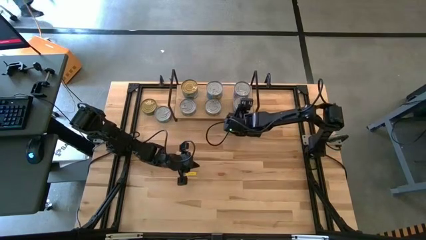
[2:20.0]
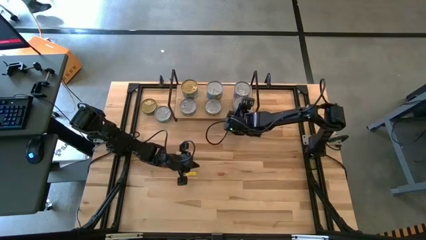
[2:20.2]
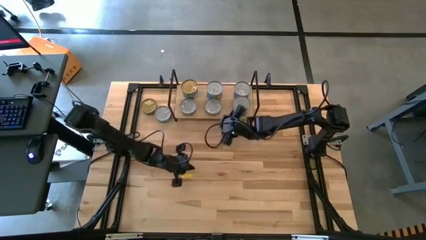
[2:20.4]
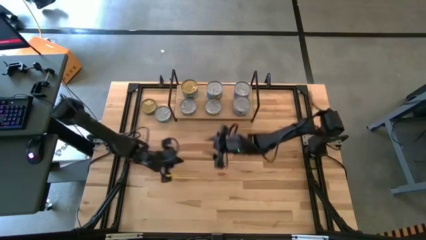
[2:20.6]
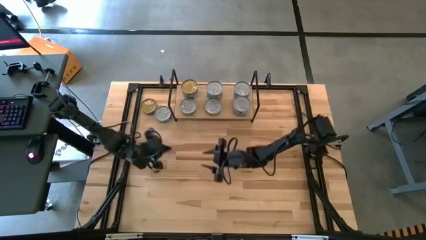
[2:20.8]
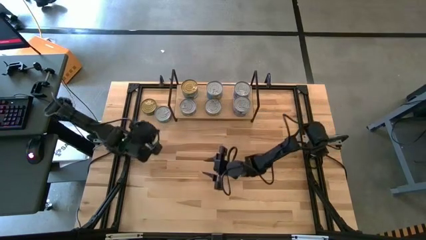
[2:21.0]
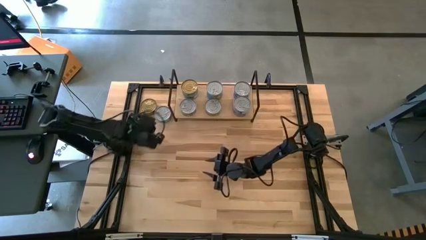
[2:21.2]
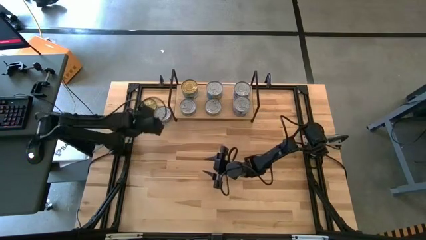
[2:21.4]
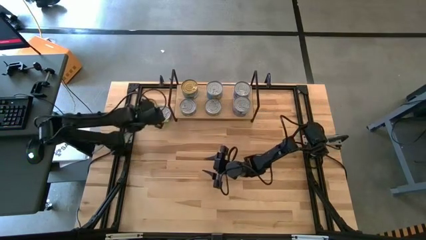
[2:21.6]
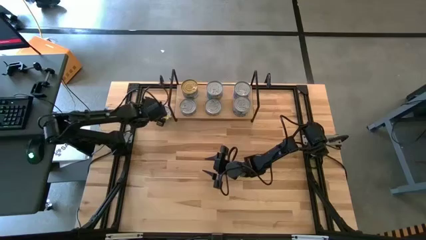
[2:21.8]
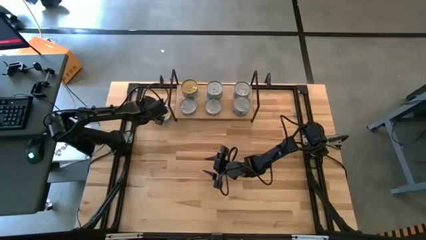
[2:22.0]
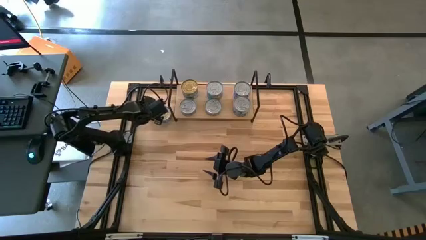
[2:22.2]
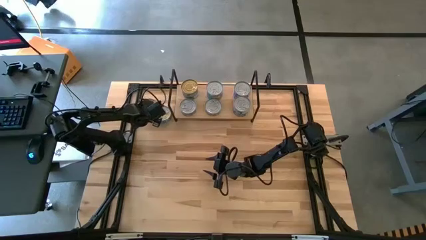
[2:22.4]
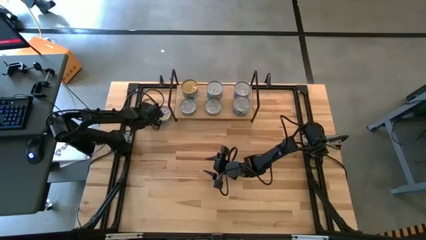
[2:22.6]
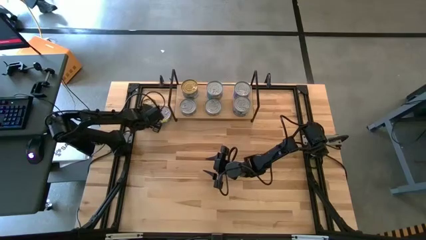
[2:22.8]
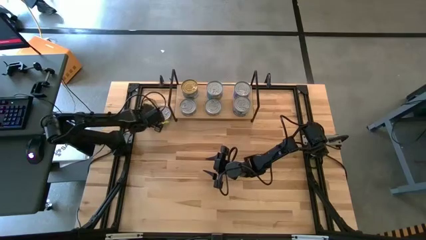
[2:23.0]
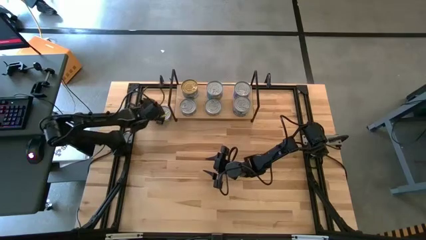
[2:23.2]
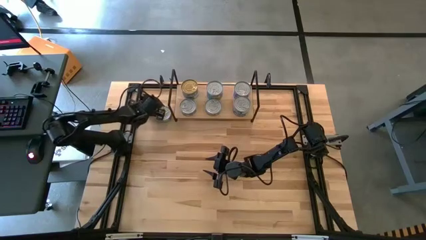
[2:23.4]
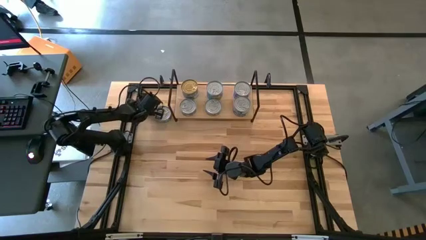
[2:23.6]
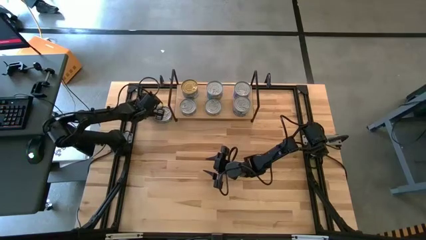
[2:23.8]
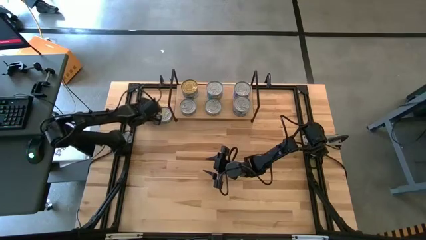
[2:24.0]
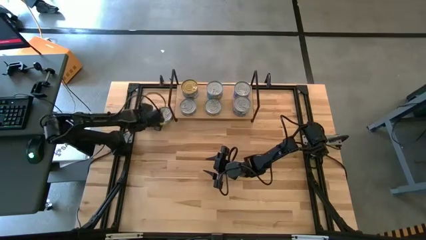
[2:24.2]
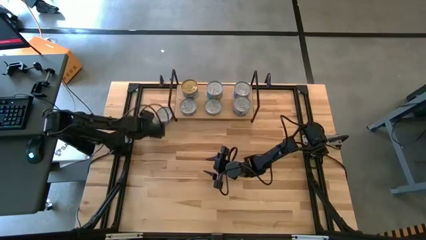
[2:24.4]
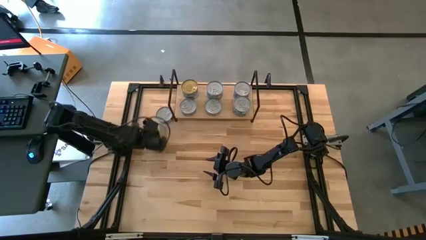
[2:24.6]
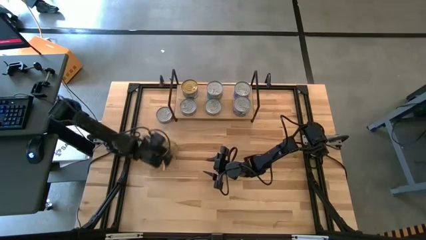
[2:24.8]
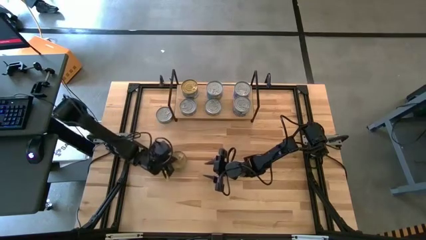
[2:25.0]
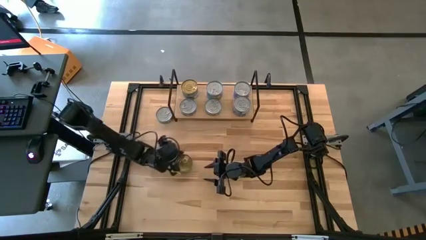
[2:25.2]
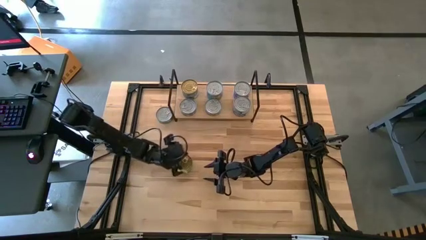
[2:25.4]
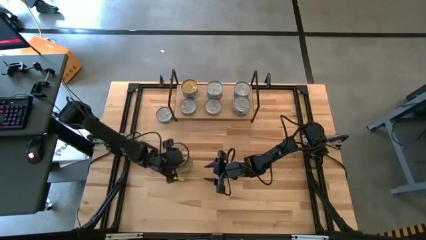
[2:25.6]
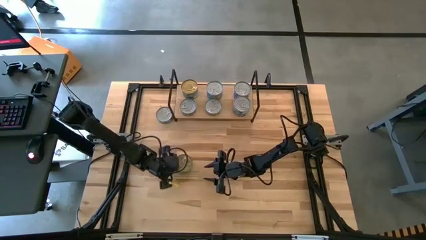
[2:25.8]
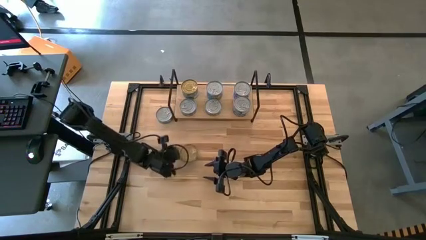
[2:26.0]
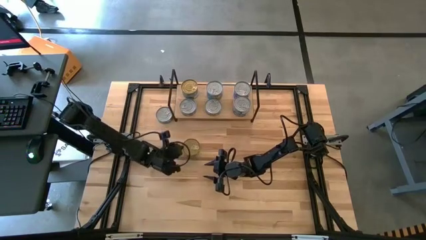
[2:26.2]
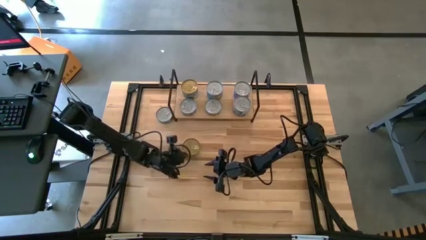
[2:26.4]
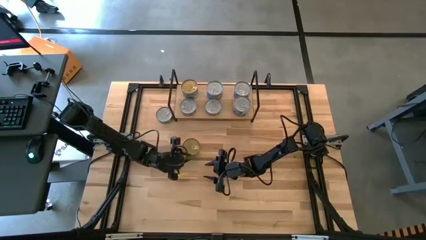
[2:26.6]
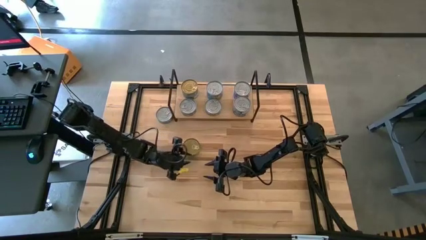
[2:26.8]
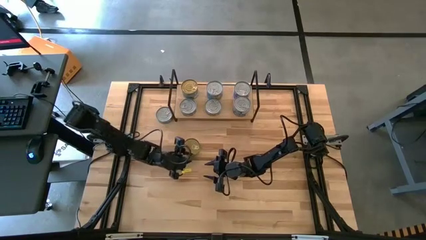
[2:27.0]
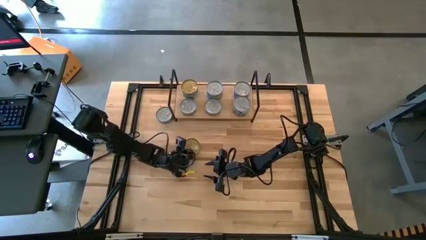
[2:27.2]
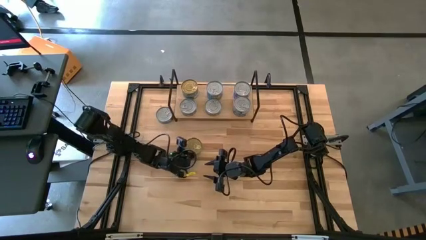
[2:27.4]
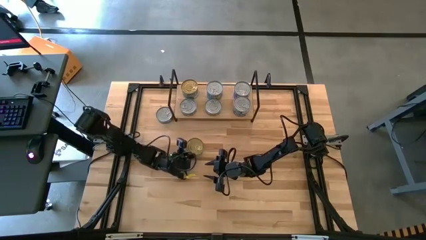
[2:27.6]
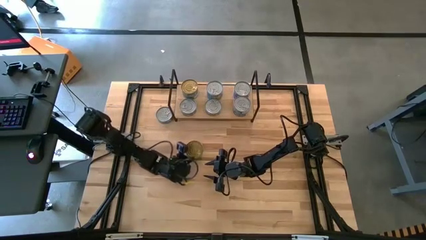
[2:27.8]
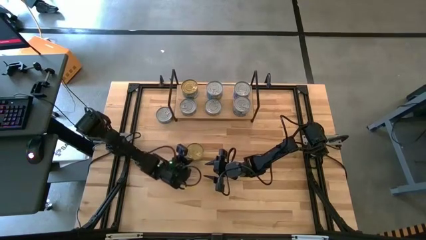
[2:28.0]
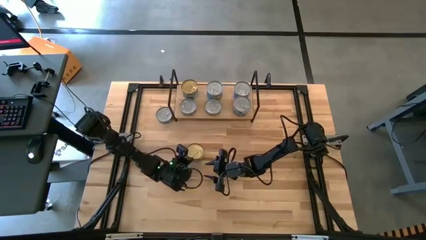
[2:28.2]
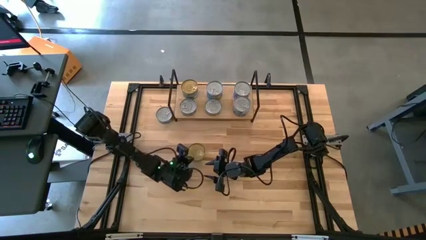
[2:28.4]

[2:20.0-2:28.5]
Task: Stack canned seafood by type on shelf
Stack the green tuna can on top of the green tuna can on the shelf

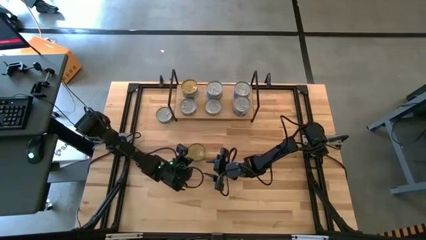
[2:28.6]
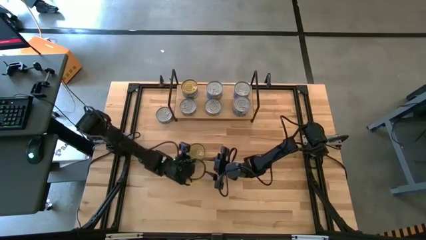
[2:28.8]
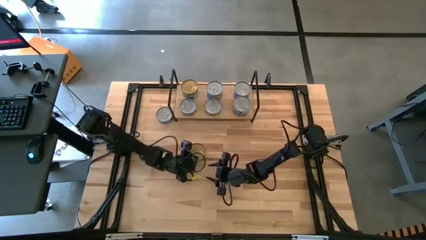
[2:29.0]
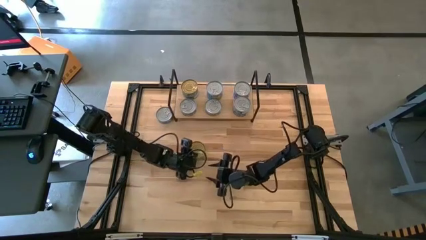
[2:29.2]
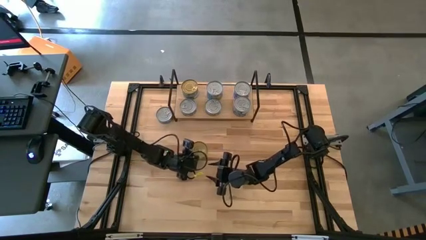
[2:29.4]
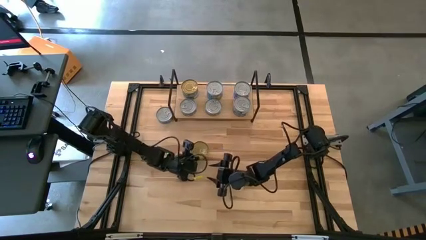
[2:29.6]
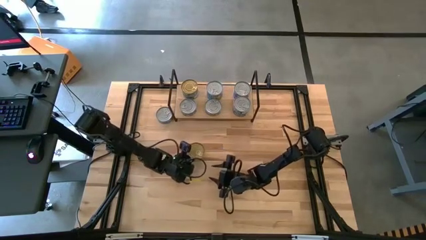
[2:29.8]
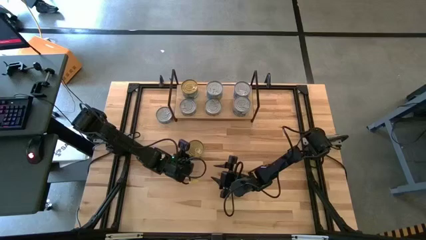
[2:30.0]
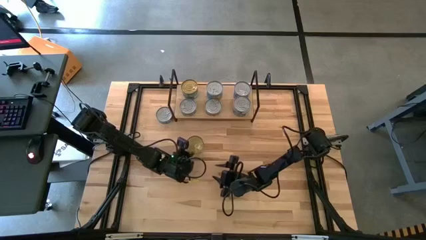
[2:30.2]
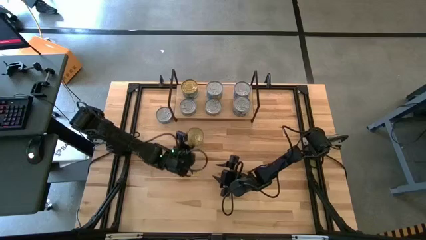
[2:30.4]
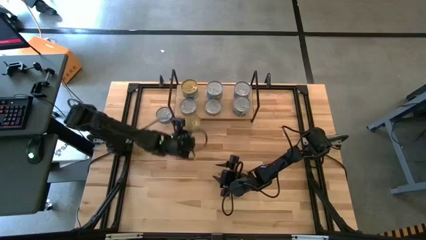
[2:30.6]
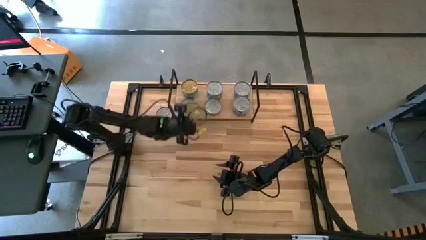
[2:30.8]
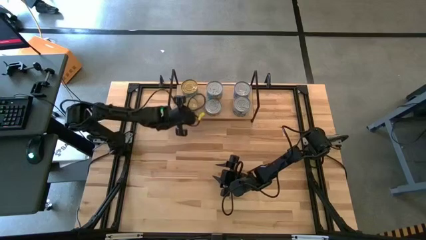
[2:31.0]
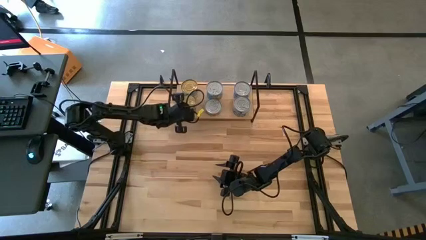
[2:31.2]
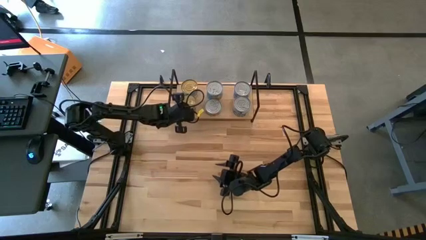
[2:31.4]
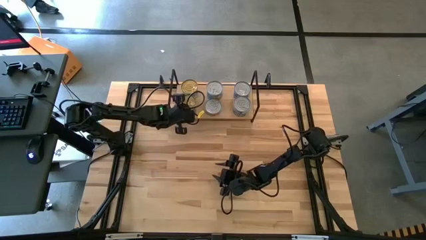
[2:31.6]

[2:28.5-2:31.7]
Stack the green blue tuna can on the other green tuna can on the shelf

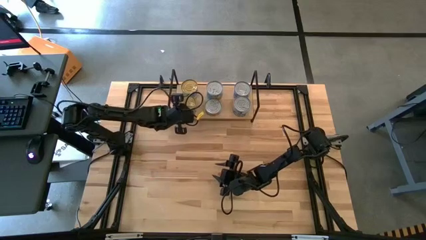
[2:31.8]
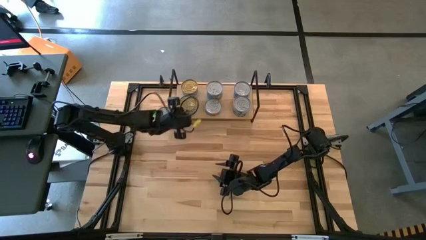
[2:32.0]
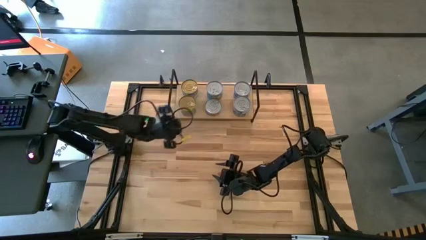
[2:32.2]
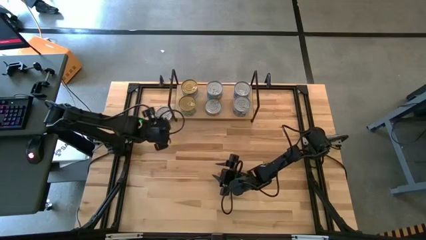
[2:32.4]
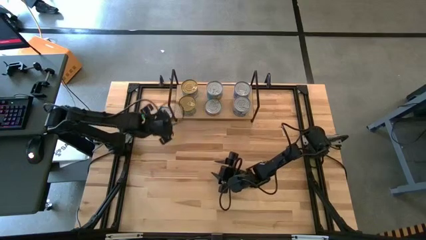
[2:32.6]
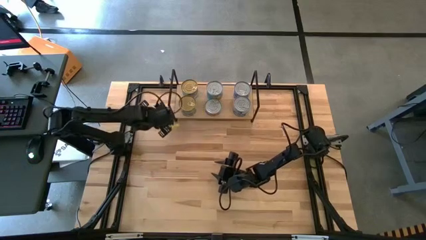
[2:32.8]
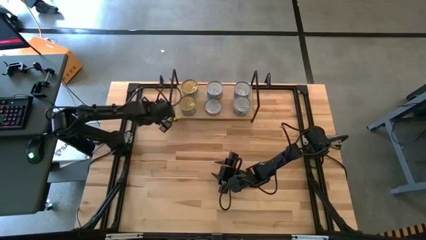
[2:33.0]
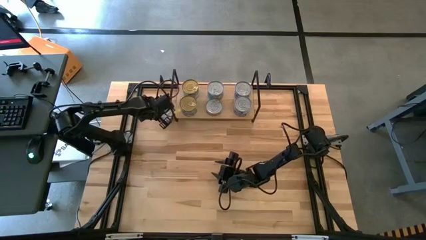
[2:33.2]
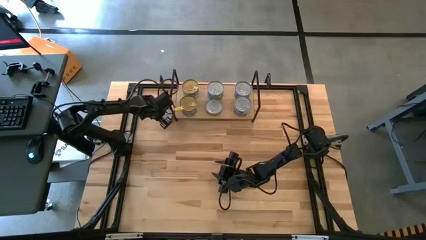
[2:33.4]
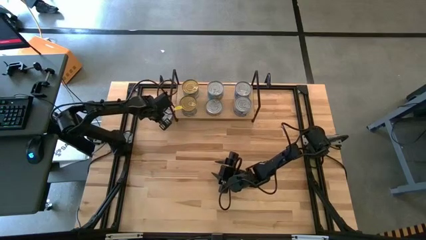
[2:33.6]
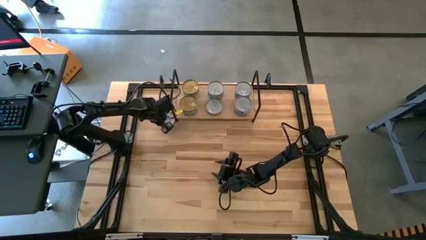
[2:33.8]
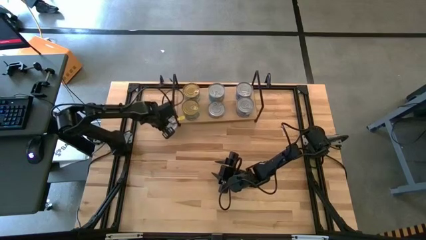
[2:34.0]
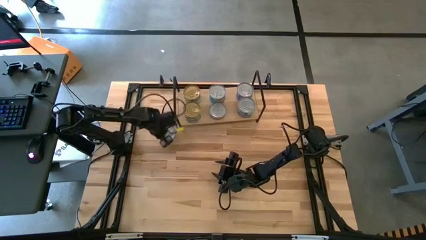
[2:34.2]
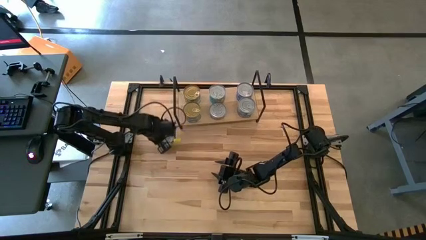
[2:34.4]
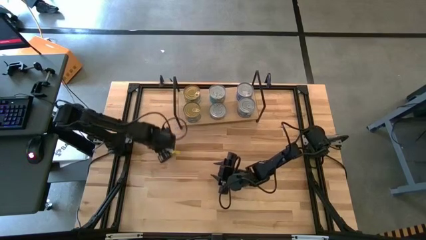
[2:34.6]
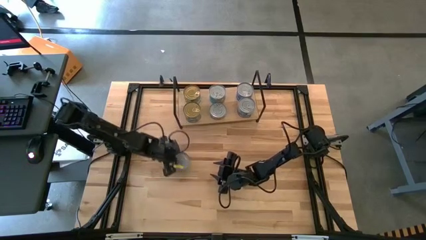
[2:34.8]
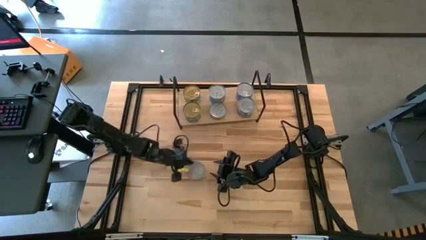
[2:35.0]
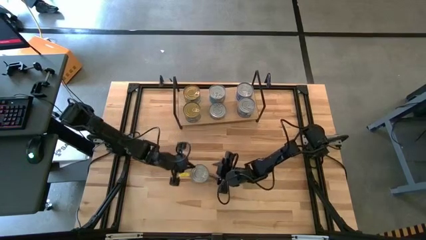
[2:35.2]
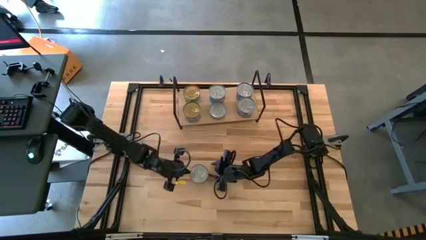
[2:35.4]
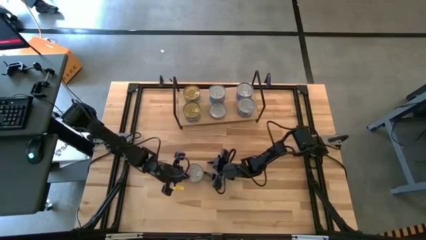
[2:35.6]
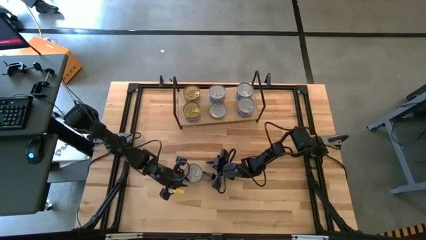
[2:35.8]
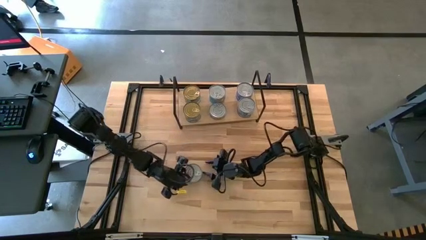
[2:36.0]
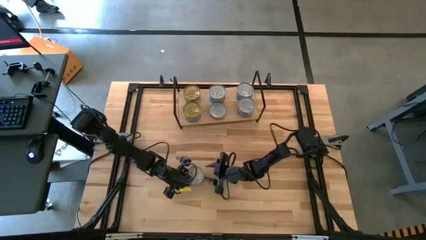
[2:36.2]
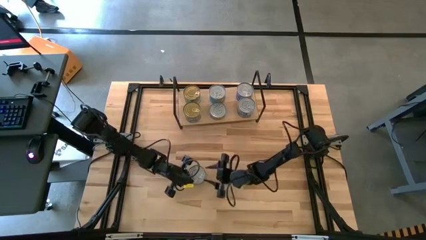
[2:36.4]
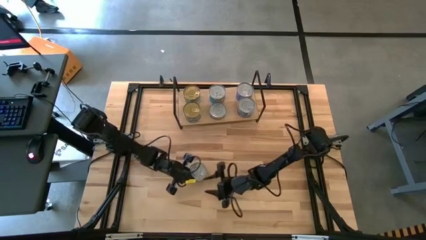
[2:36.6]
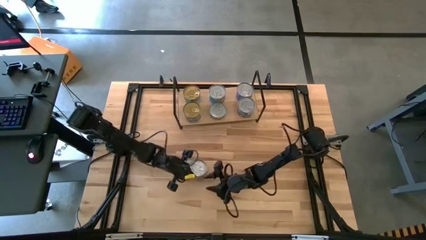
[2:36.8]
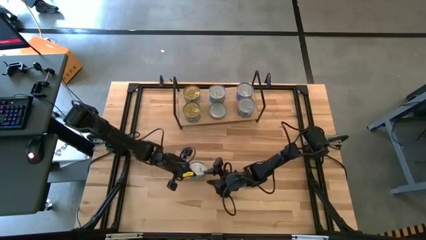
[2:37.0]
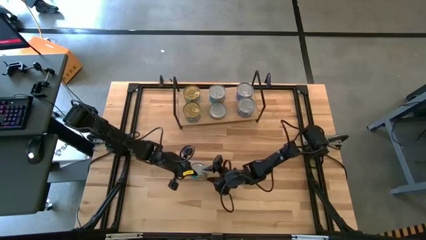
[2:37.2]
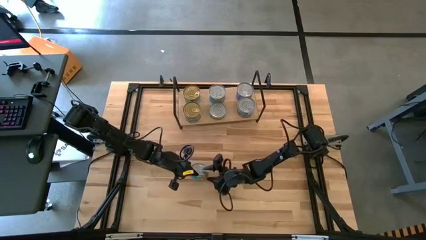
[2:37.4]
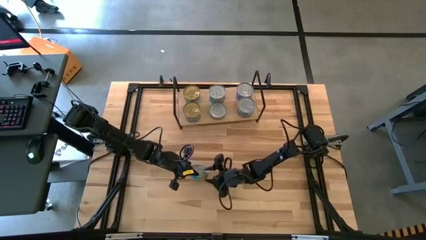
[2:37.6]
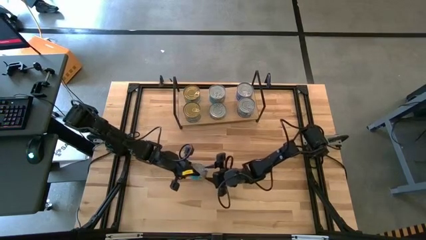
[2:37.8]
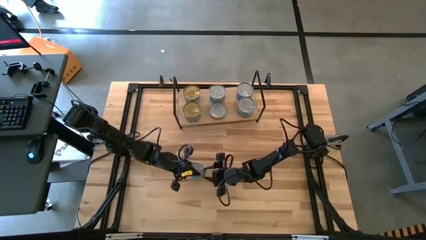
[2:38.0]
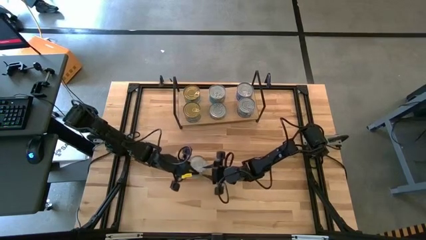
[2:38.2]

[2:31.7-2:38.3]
Stack the yellow blue tuna can on top of the yellow blue tuna can on the shelf
